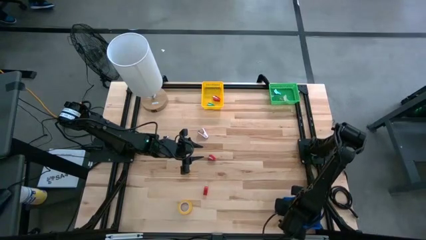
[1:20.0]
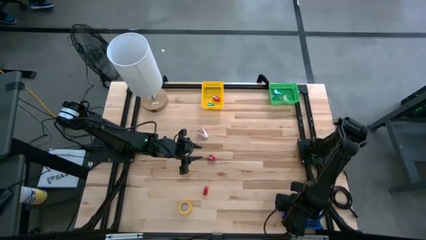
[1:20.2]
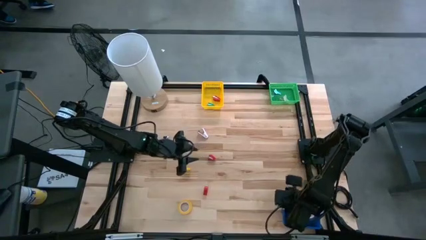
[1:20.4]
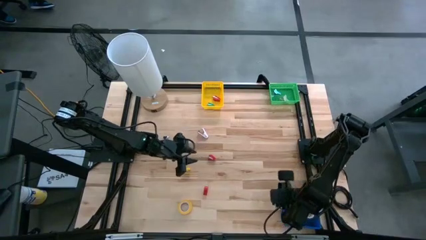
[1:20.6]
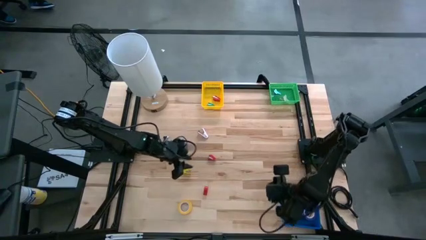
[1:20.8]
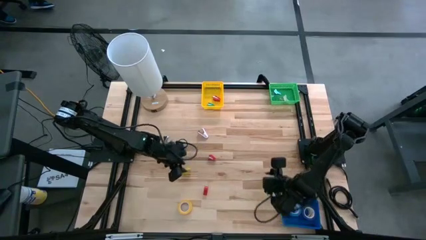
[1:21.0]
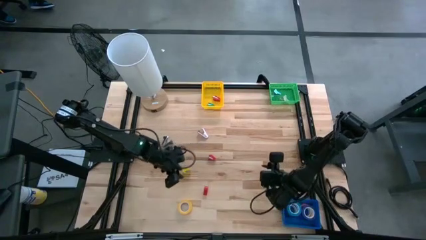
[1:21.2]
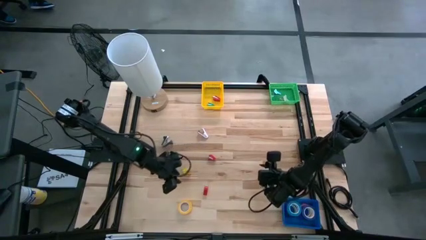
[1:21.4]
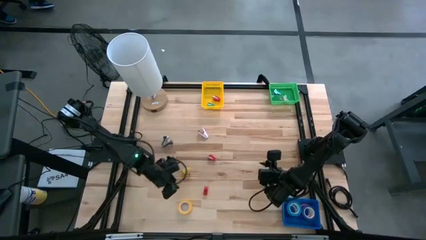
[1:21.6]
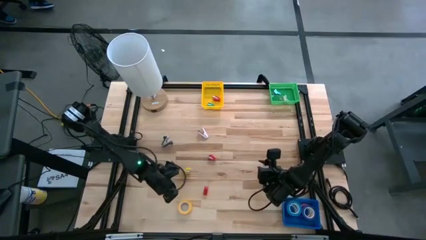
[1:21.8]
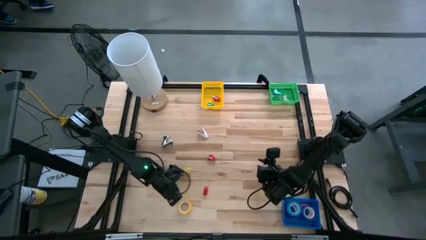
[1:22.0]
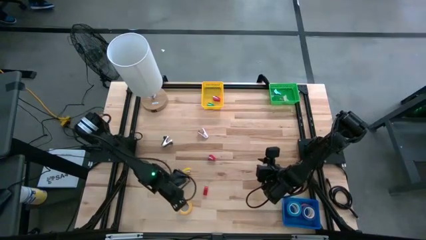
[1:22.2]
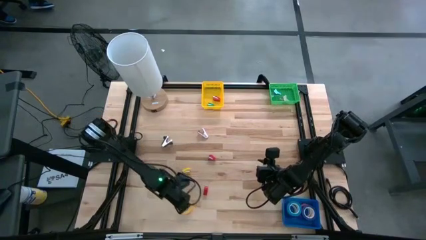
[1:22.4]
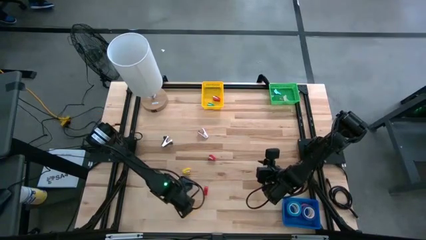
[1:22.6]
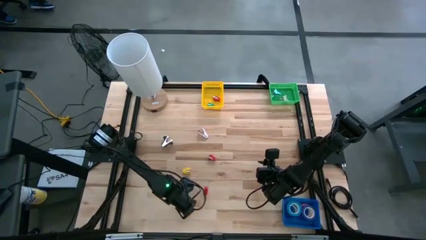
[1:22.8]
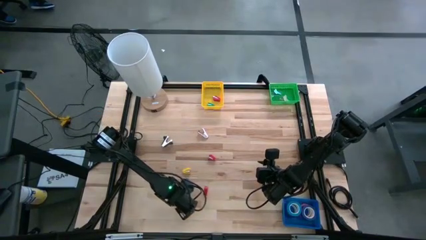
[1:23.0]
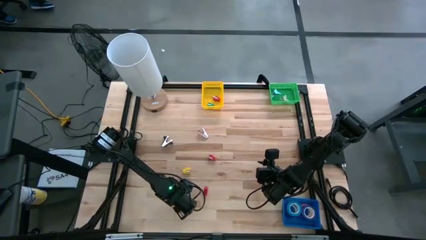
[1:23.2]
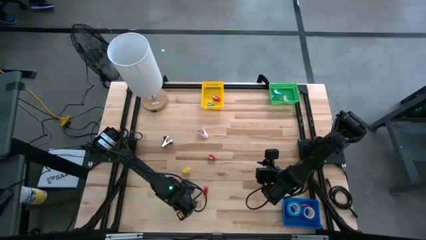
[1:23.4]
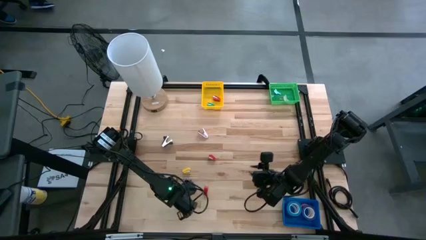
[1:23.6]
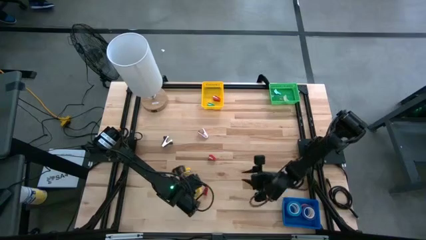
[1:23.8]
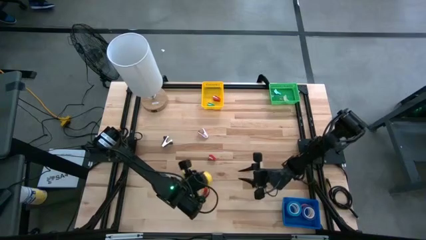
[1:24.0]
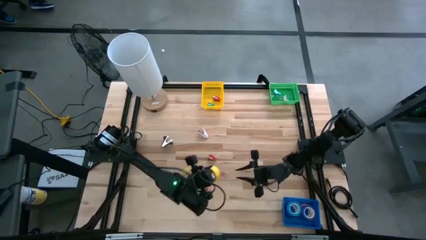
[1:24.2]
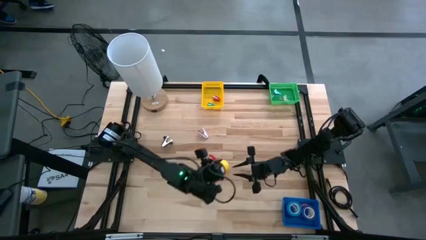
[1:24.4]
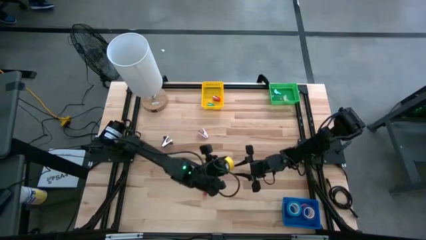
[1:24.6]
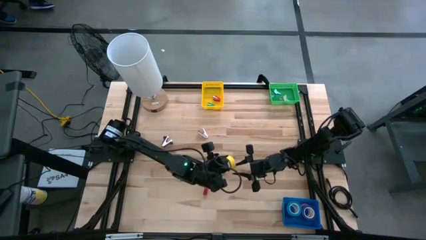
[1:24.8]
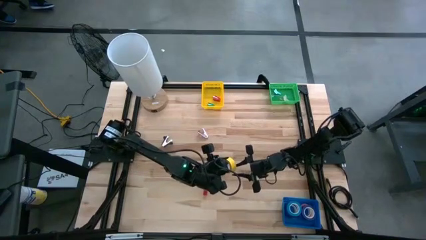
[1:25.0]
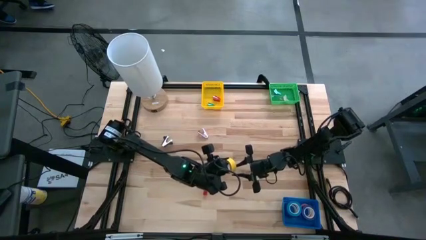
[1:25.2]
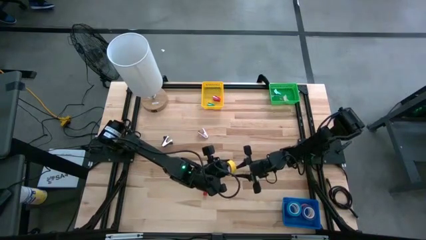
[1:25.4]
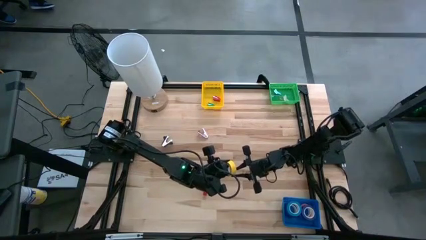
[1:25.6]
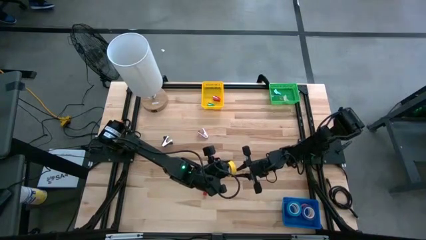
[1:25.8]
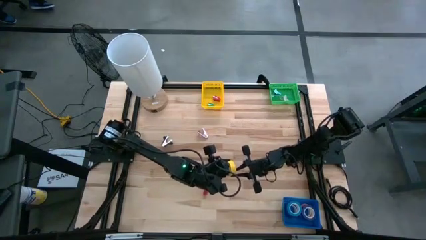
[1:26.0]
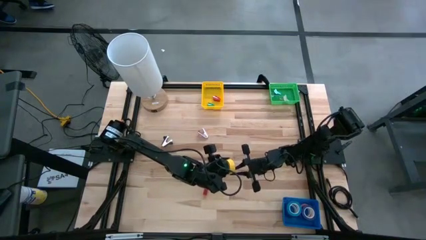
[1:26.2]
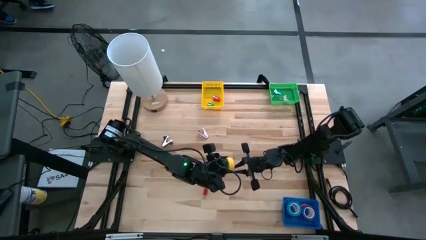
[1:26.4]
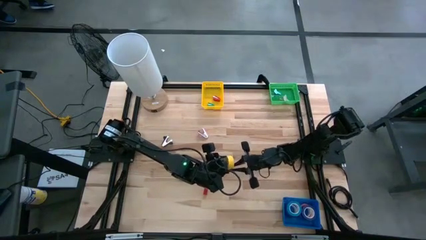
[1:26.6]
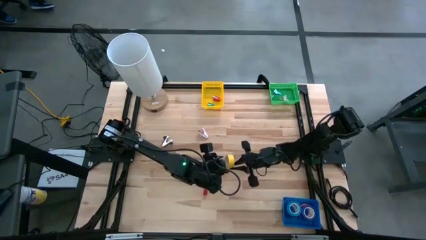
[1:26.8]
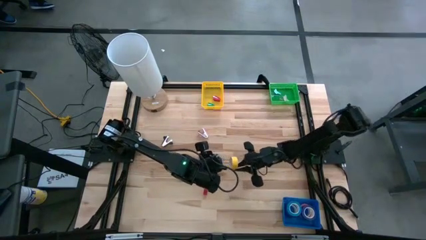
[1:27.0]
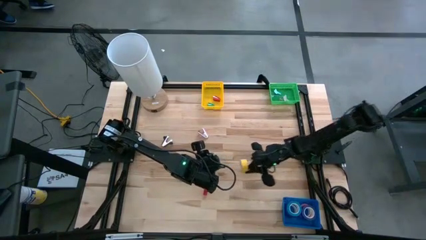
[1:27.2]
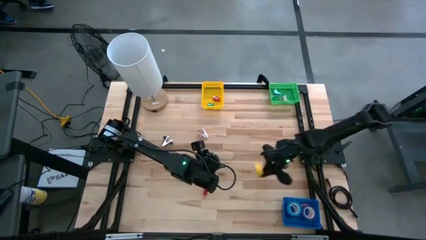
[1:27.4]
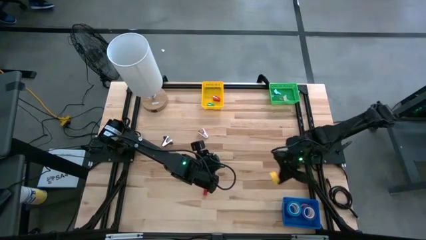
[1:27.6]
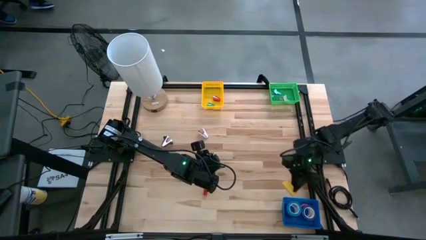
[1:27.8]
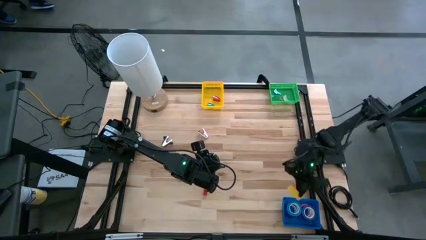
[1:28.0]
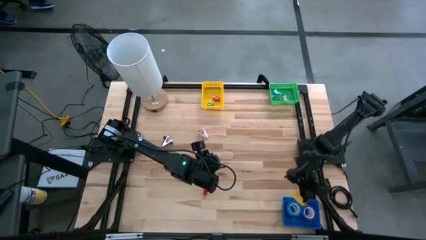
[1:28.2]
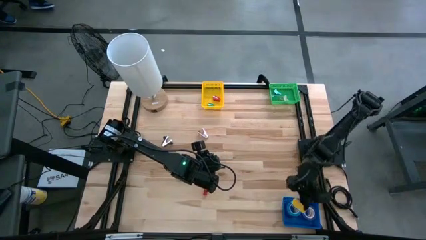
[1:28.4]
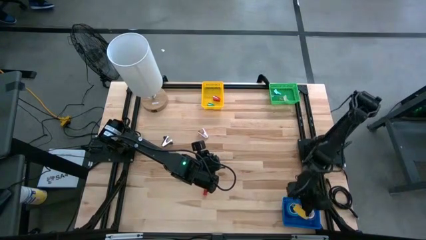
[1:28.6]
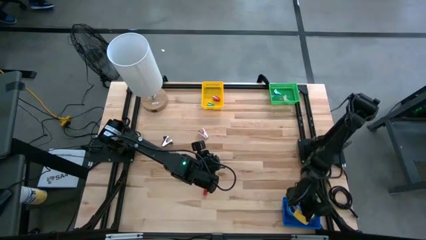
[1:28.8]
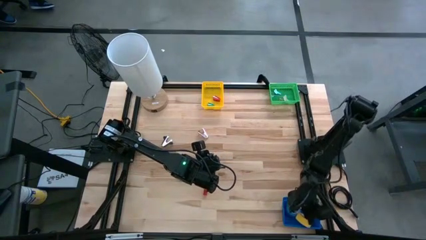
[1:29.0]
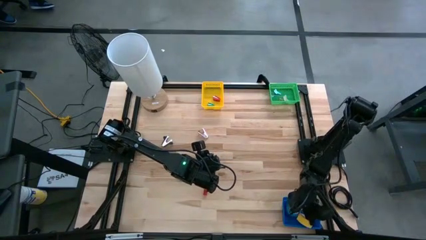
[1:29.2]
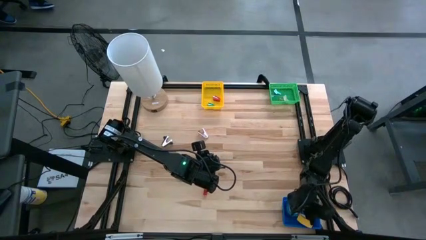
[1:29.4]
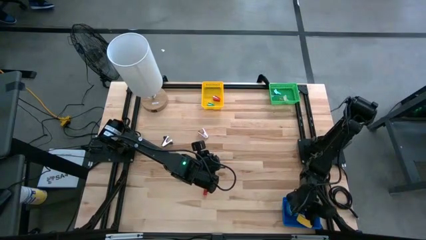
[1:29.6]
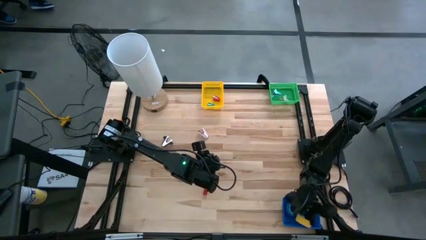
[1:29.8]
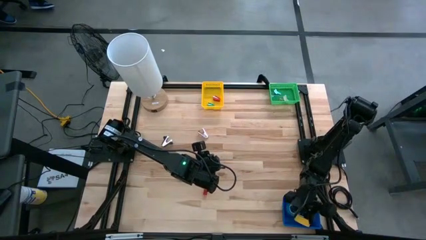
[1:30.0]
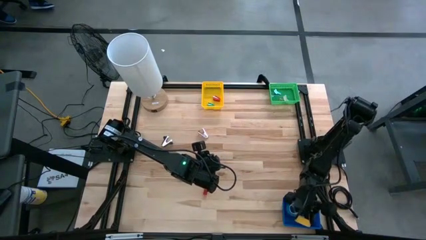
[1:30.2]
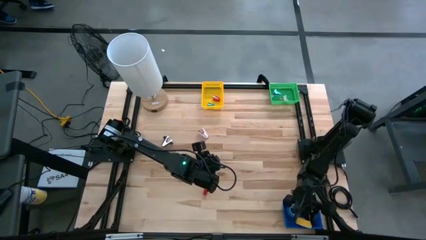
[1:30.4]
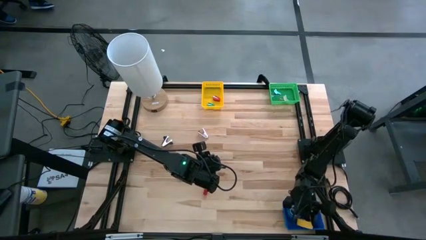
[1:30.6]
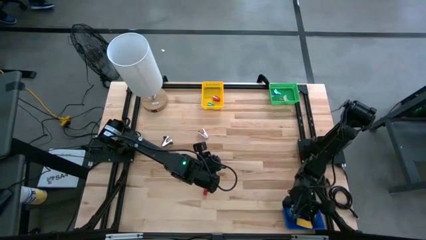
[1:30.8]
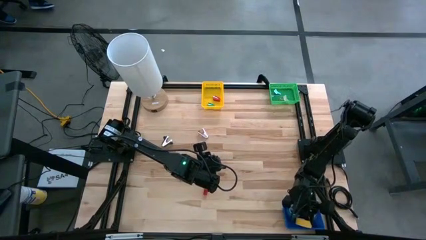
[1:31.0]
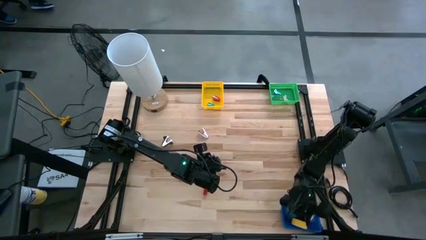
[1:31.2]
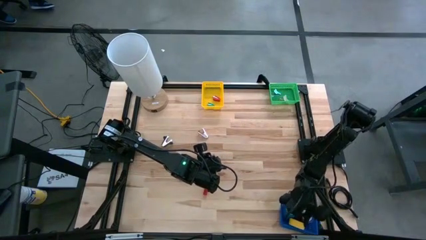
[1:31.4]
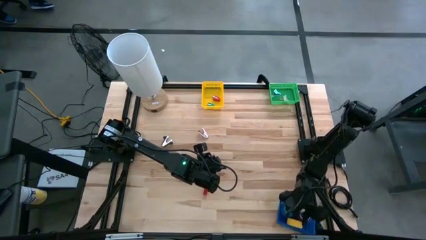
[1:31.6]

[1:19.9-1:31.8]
Task: Pick and place Stapler, Stapler remover, tape
Put the yellow tape into the blue bin

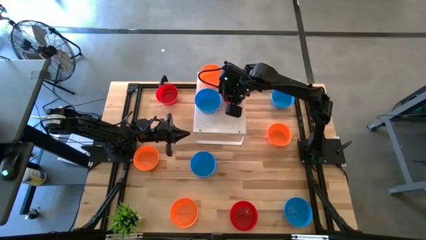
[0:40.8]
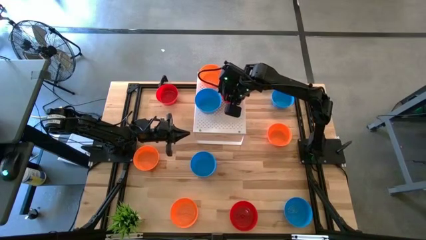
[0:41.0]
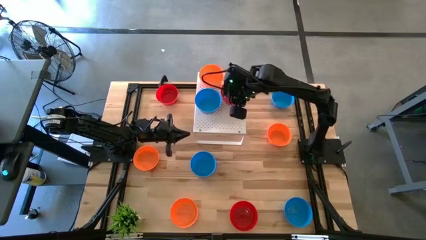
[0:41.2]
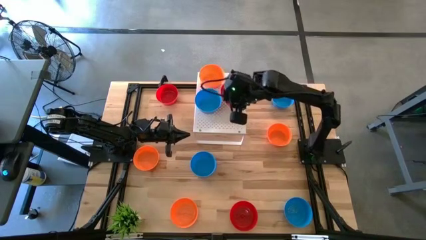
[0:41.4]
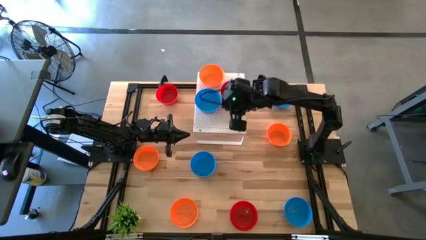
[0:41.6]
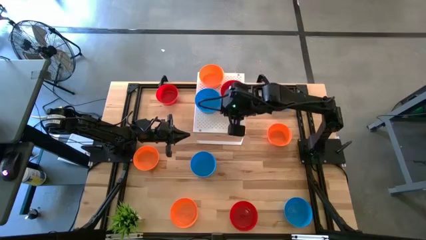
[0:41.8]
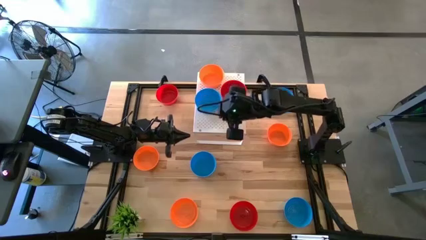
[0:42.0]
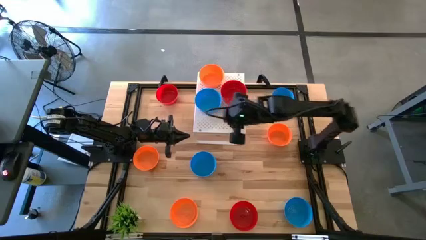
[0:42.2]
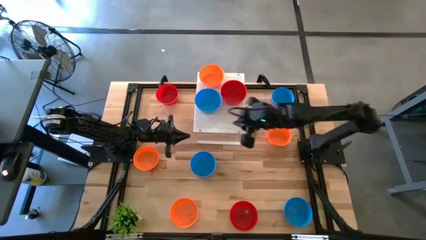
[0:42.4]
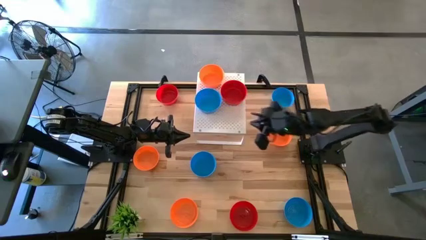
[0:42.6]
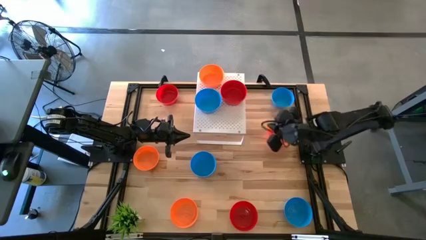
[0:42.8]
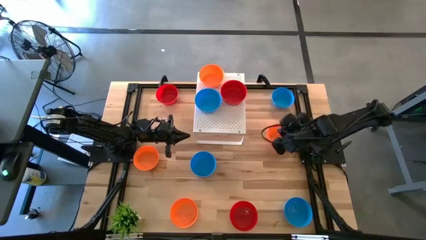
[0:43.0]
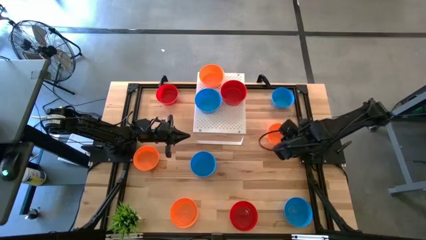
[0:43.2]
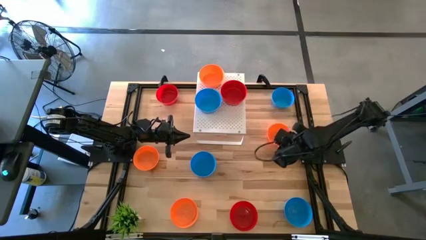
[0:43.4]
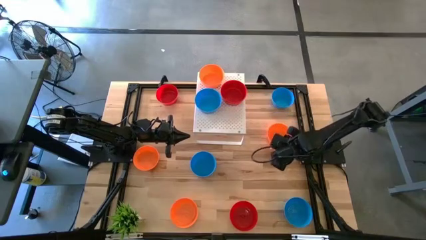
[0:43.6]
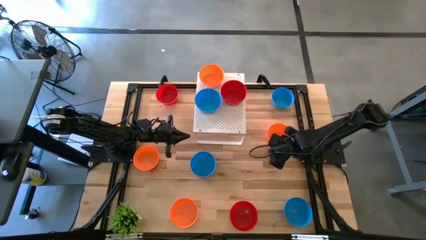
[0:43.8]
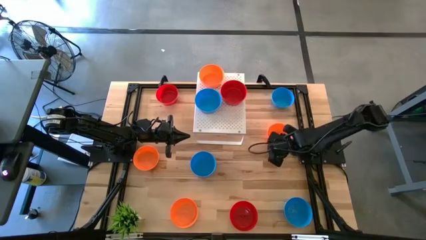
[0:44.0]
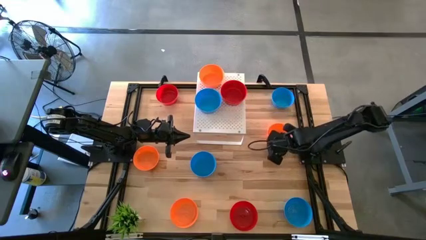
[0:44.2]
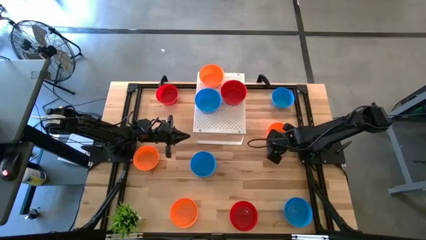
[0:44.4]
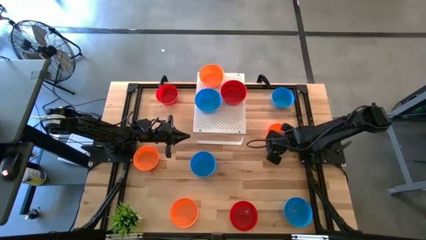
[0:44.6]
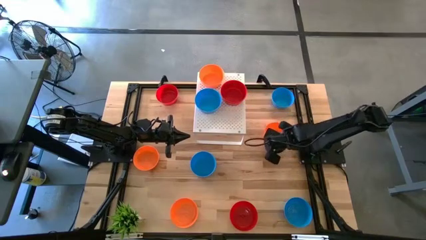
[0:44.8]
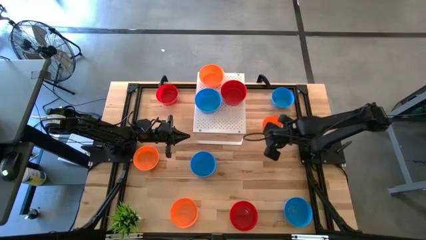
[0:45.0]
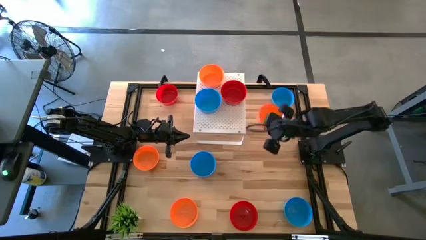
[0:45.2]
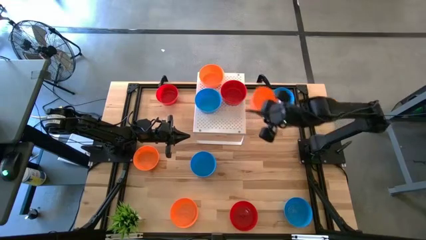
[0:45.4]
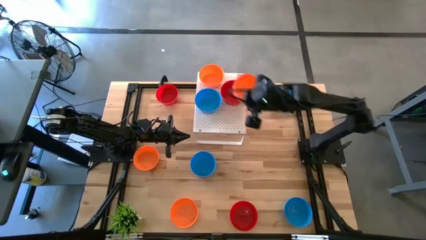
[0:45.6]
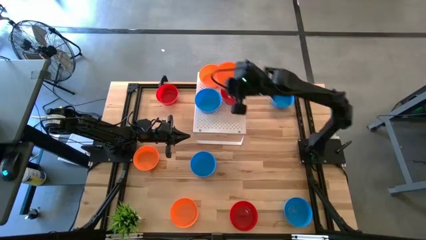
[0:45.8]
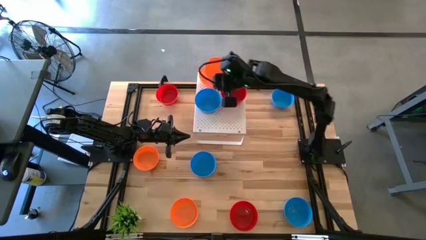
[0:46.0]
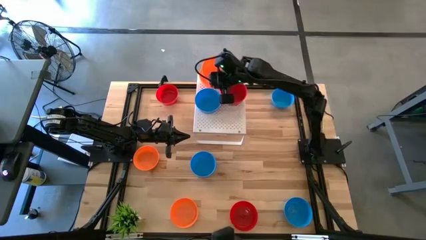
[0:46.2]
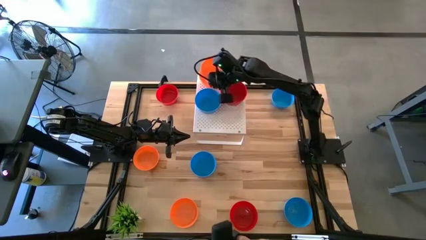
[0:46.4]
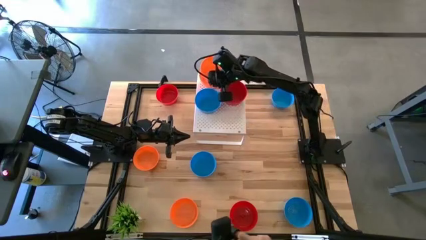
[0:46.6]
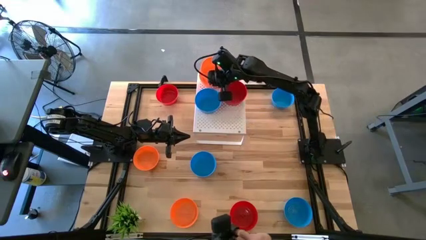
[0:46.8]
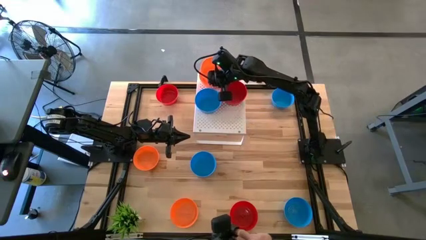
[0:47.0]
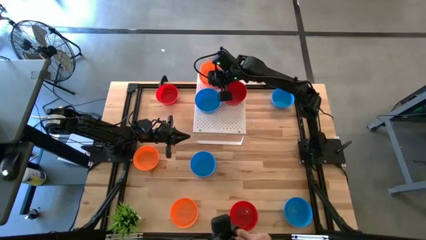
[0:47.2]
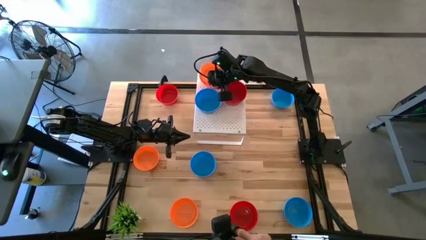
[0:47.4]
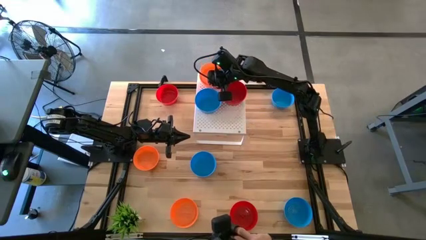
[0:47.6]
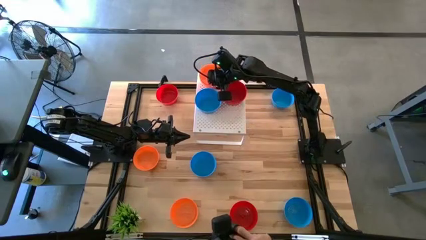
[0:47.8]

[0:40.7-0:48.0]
Task: Pick & Place Mini bowls
Stack the orange bowl on top of the orange bowl on the shelf
